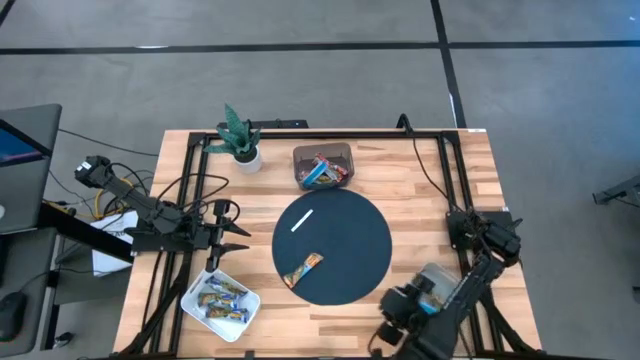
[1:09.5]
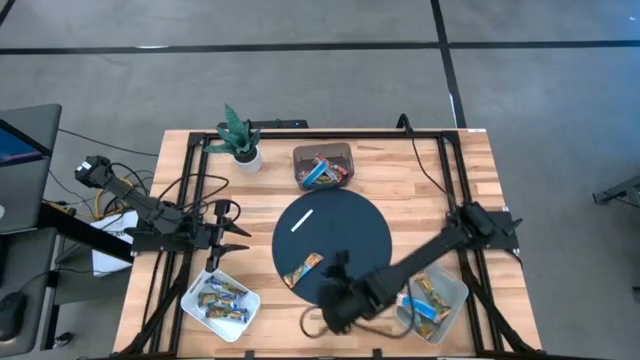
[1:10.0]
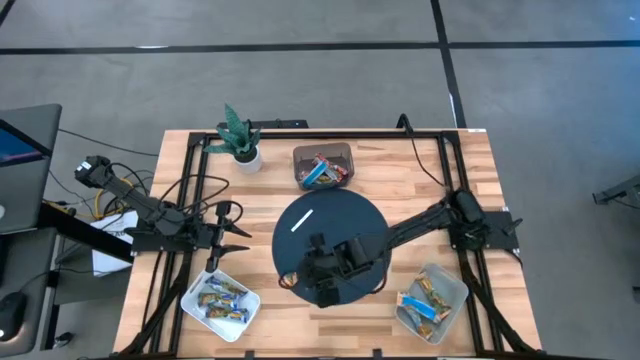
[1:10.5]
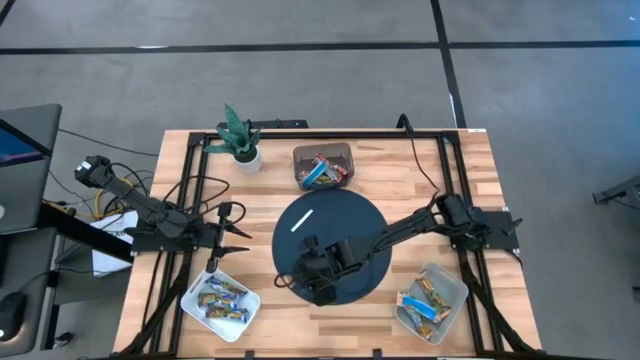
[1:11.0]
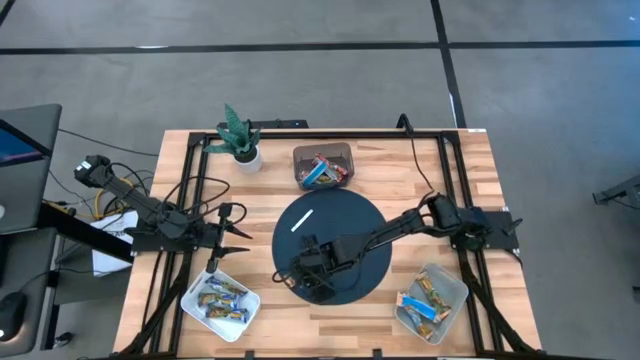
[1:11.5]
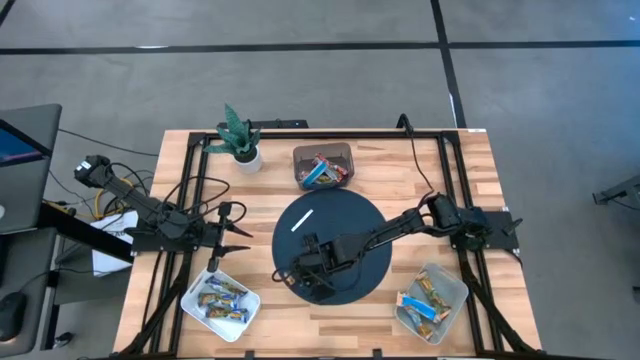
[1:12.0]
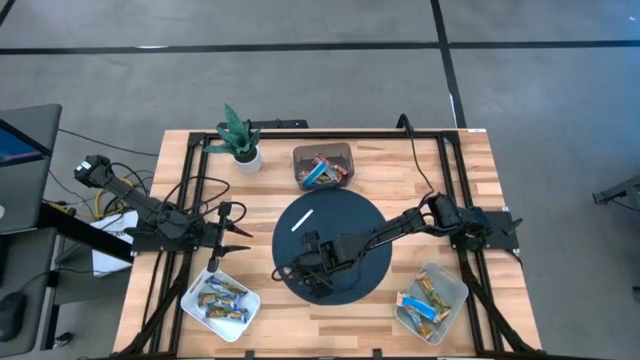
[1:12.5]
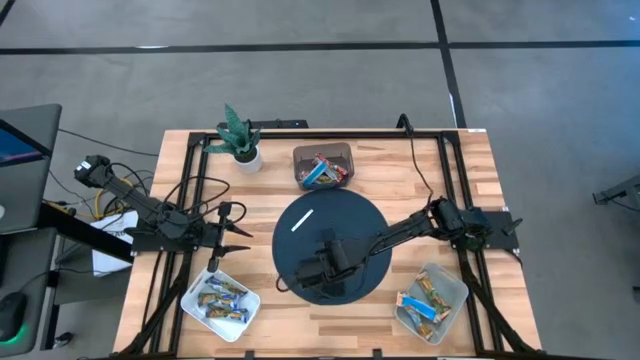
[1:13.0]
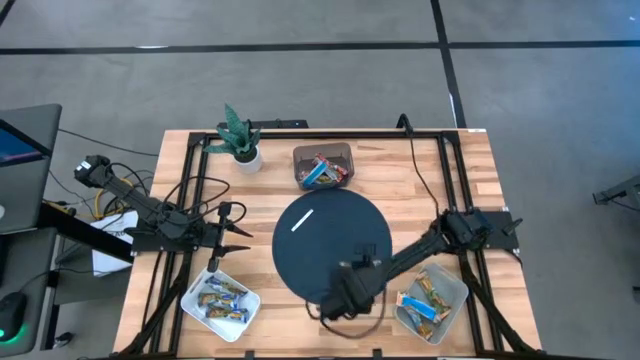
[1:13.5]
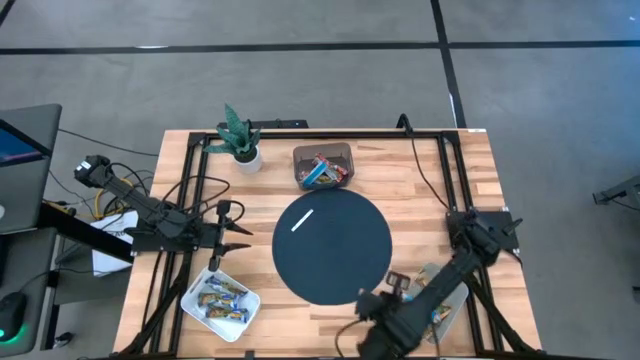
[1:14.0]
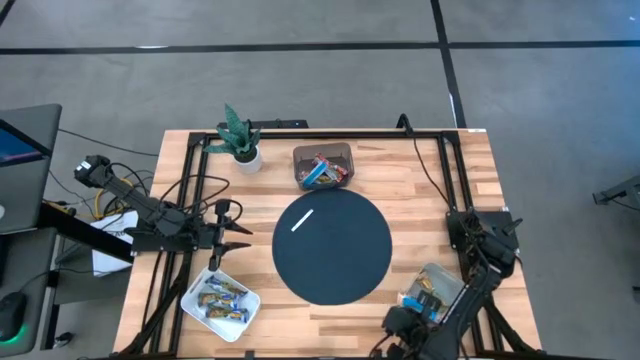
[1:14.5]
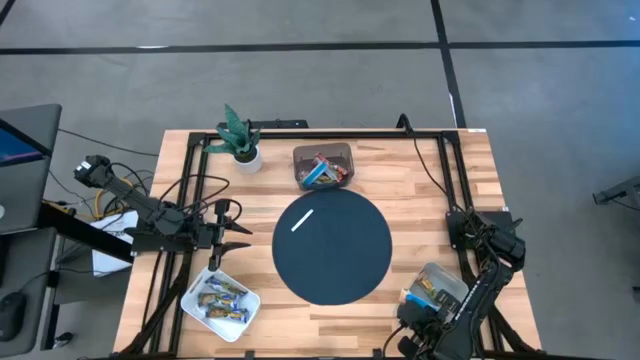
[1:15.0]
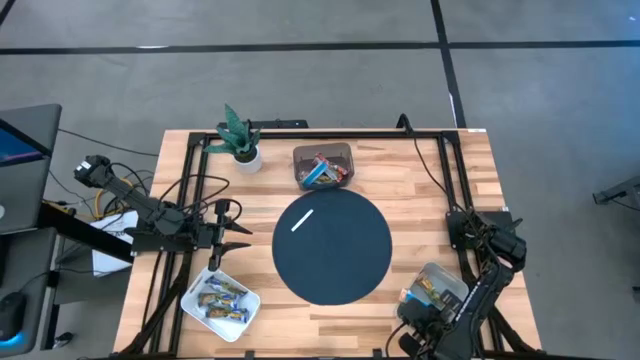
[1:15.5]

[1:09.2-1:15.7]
Task: Pick and place Granola Bars by type
Put the yellow granola bar into the gray bin

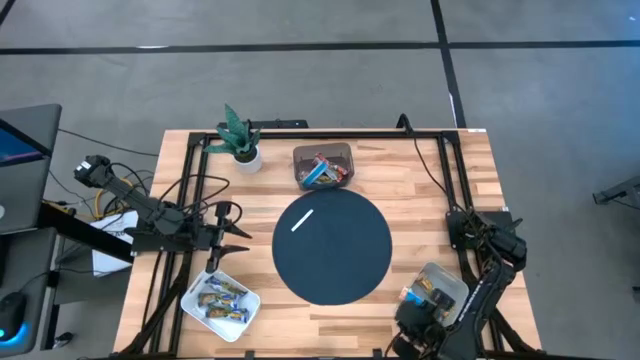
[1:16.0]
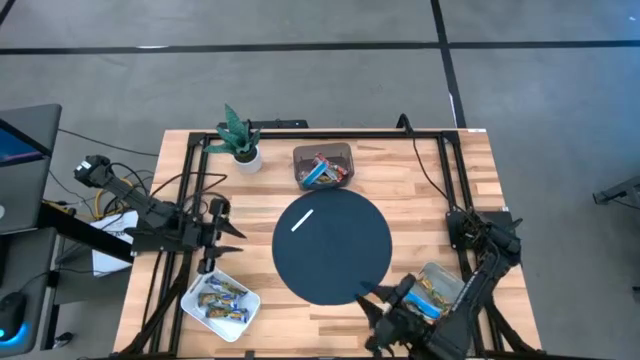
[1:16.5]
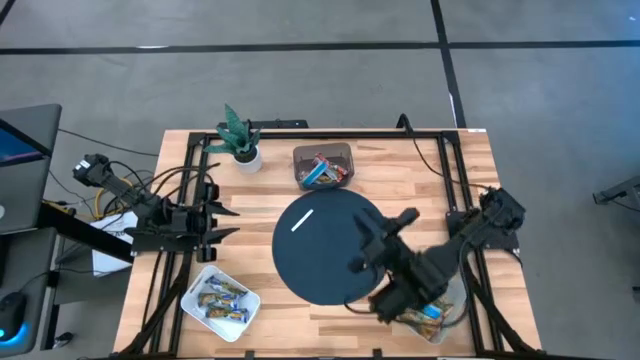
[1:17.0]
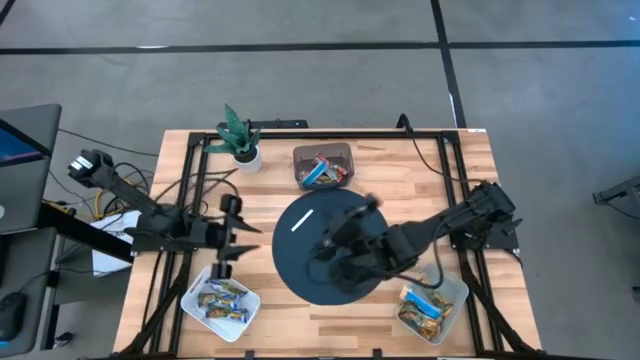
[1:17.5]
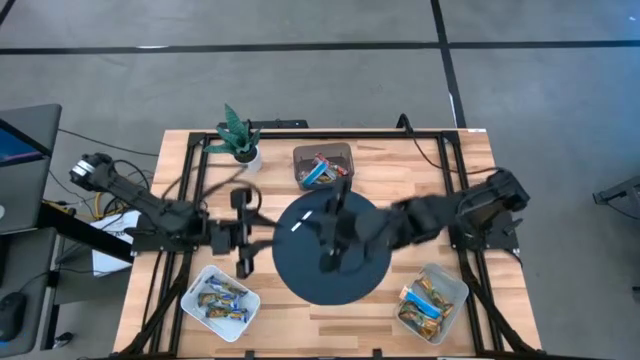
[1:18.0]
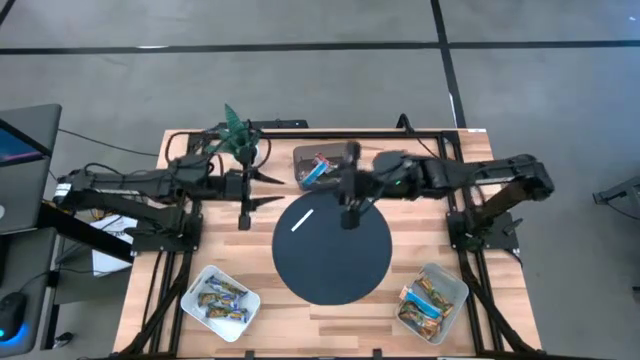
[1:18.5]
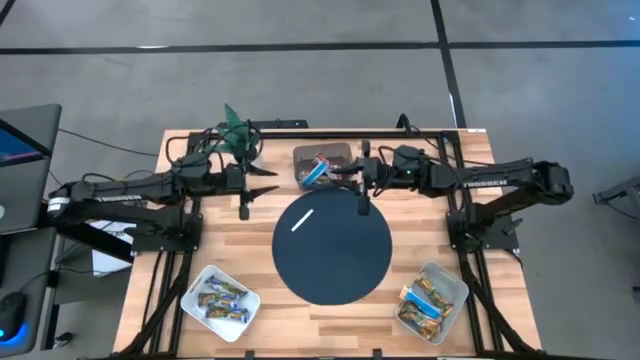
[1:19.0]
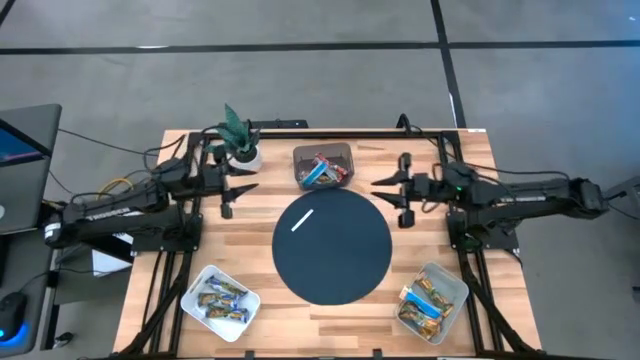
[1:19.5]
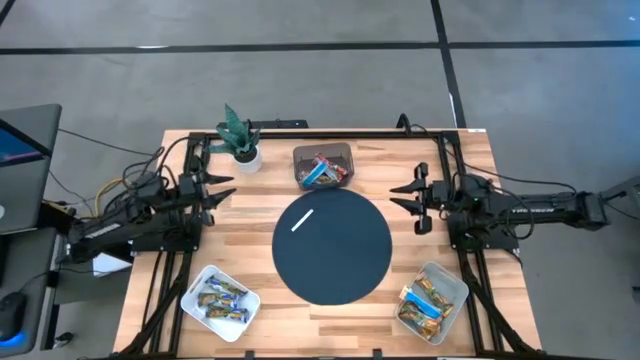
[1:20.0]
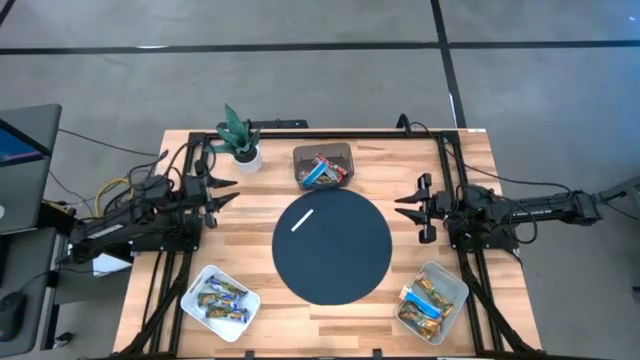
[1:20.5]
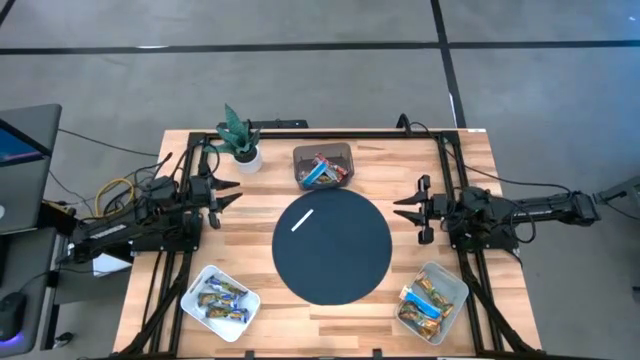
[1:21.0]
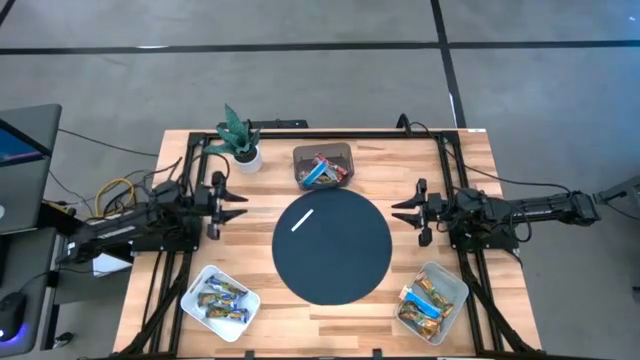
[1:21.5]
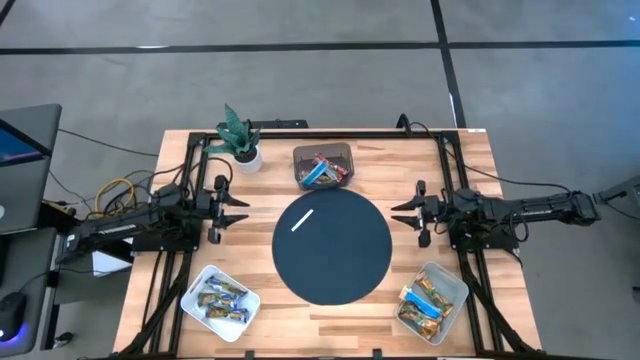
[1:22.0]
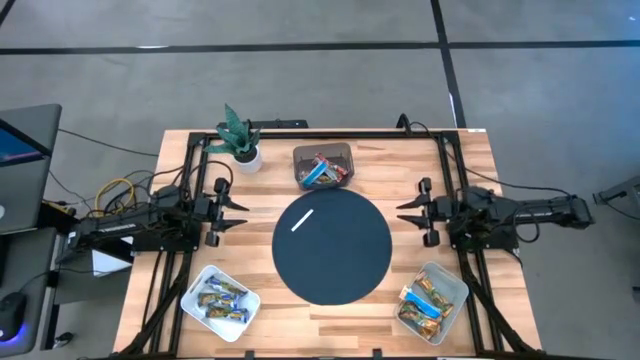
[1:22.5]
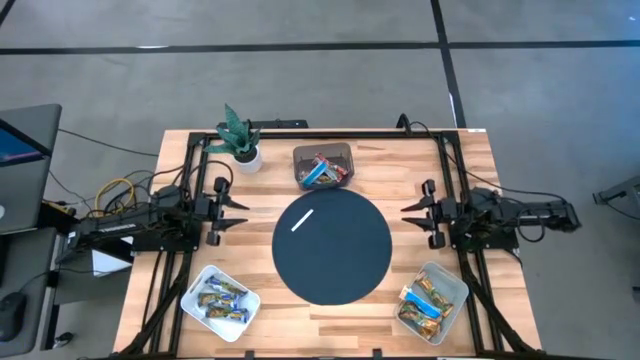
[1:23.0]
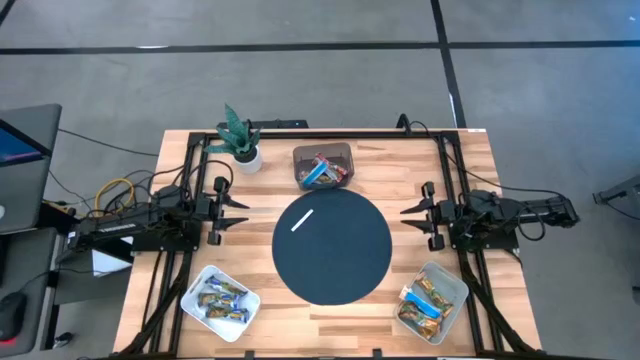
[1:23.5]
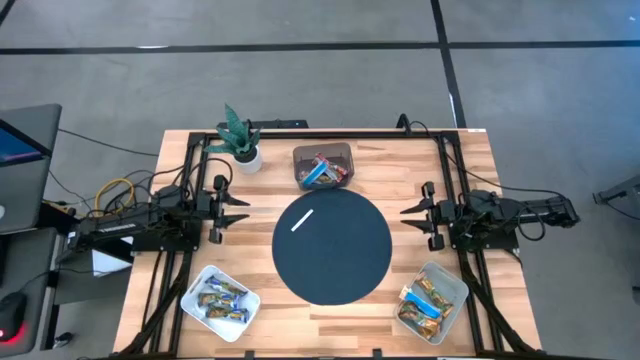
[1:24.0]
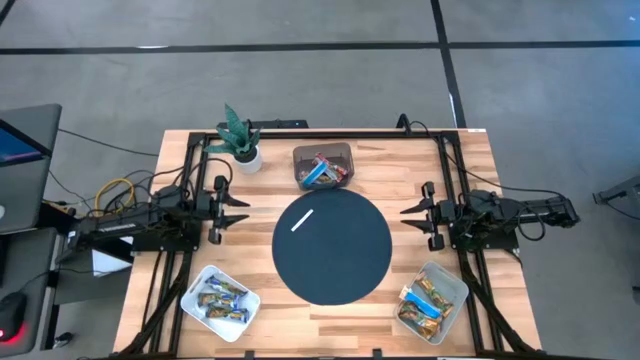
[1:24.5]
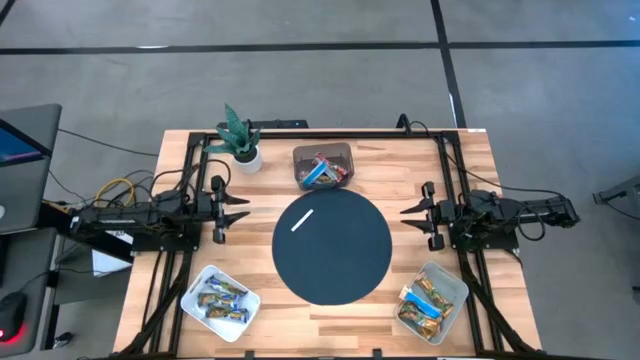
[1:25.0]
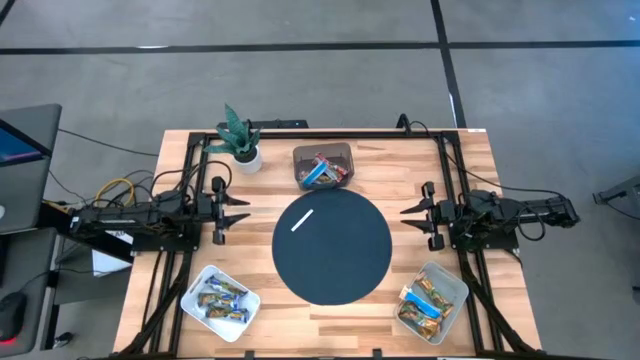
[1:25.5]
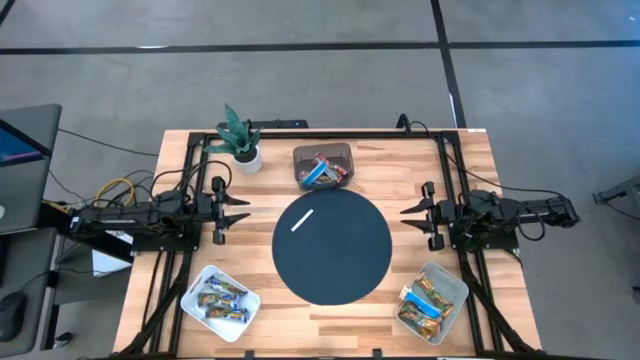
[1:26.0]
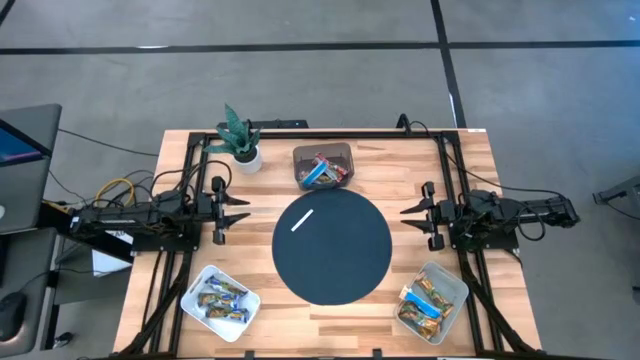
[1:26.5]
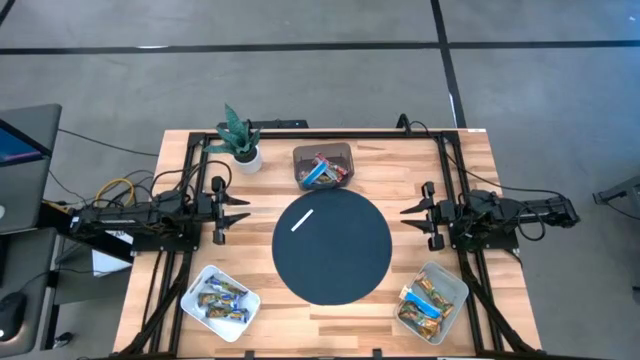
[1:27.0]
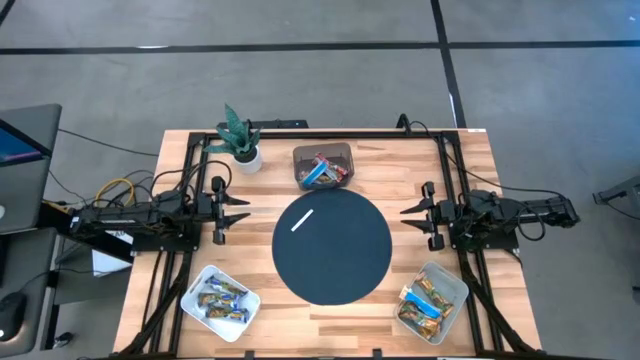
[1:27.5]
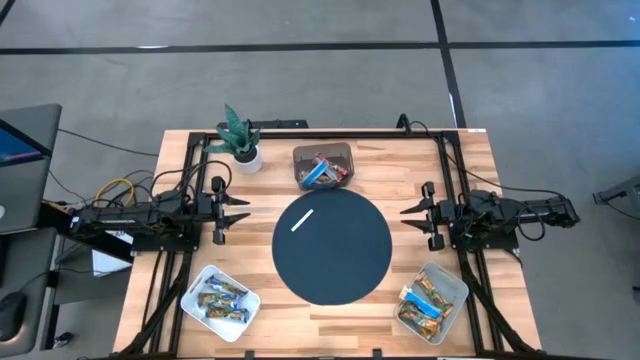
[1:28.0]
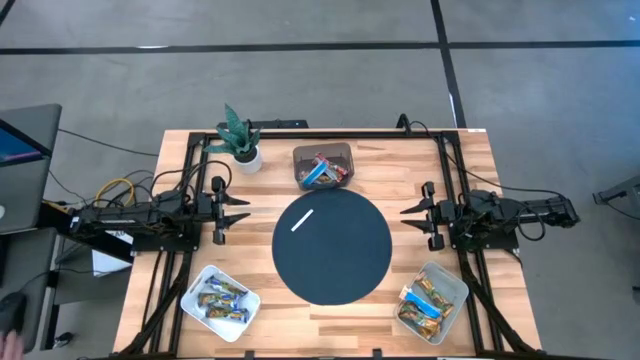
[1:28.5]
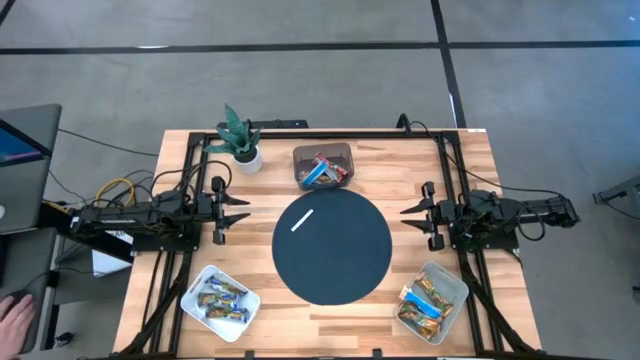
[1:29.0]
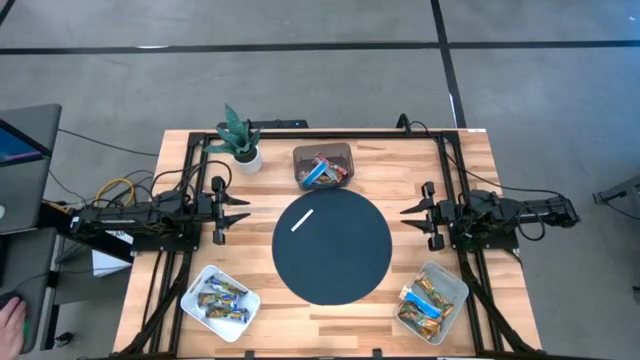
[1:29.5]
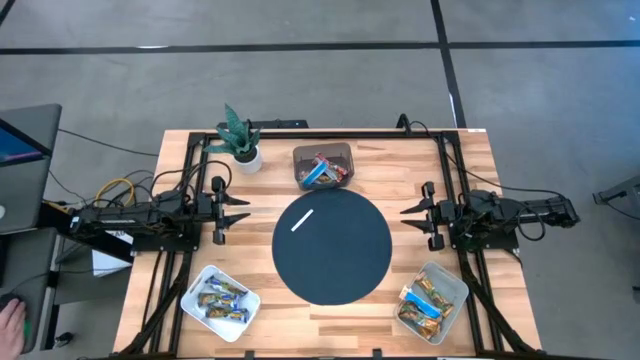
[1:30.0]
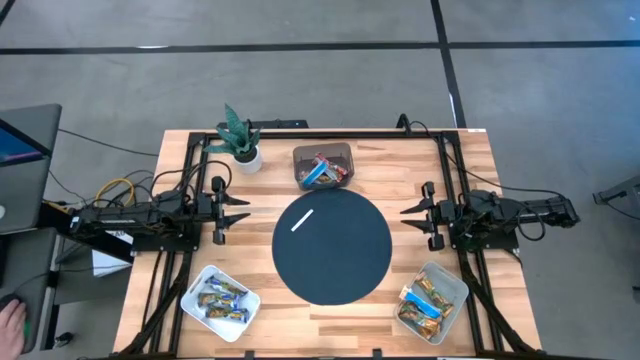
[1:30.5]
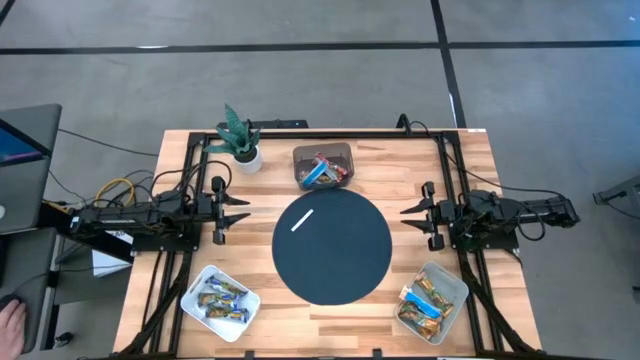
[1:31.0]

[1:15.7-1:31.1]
Return to Home Position
